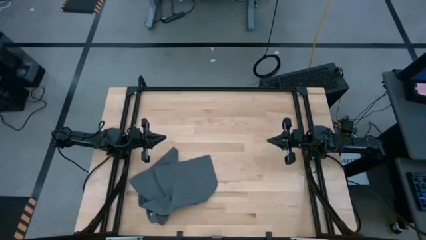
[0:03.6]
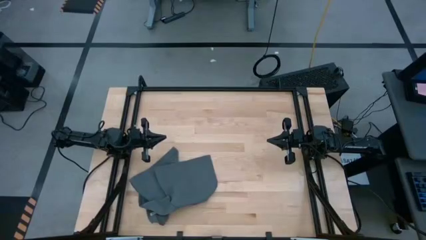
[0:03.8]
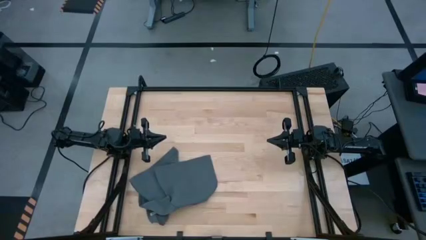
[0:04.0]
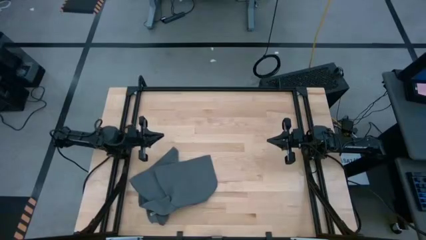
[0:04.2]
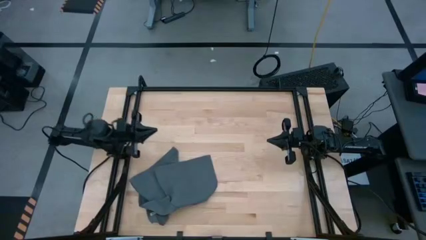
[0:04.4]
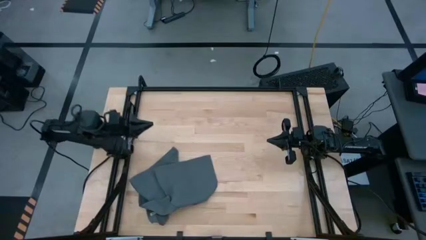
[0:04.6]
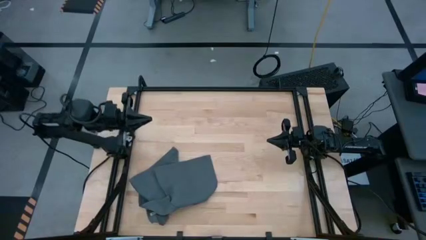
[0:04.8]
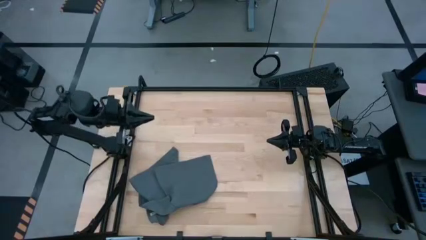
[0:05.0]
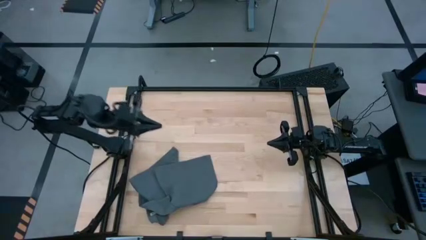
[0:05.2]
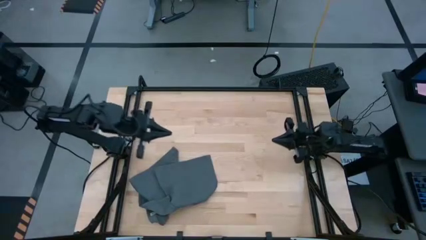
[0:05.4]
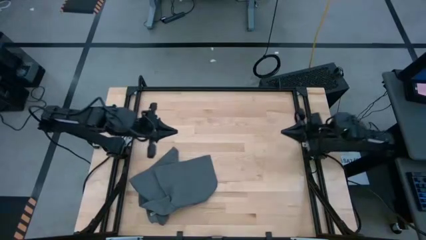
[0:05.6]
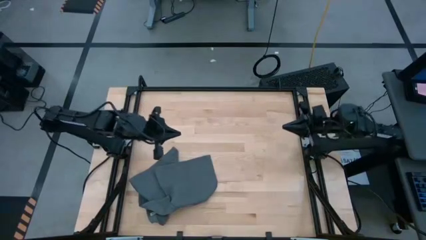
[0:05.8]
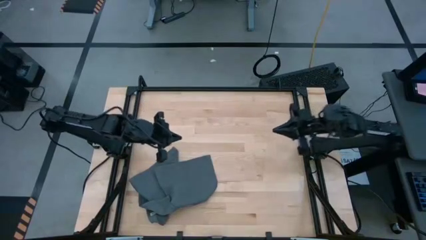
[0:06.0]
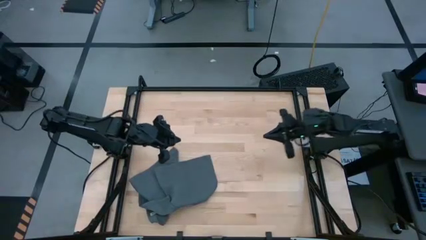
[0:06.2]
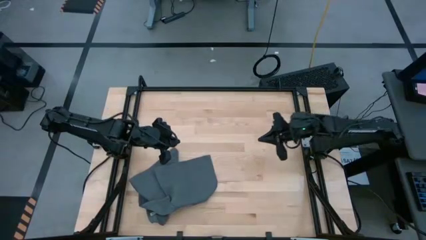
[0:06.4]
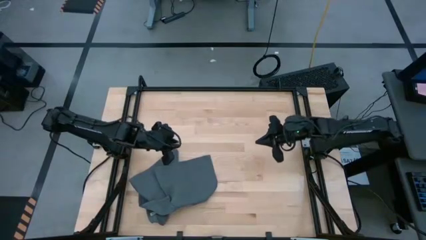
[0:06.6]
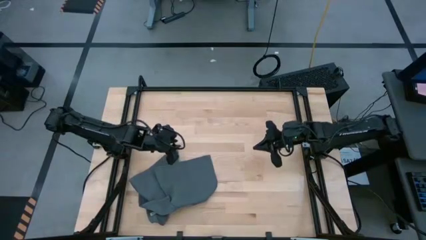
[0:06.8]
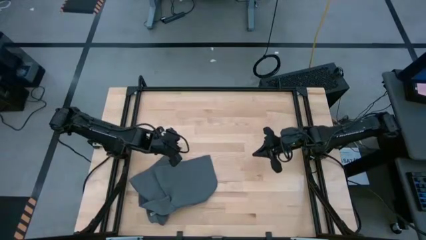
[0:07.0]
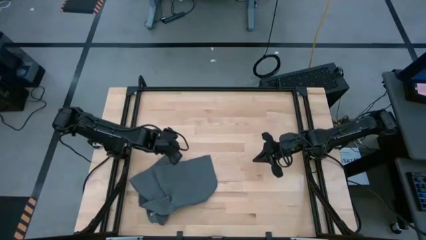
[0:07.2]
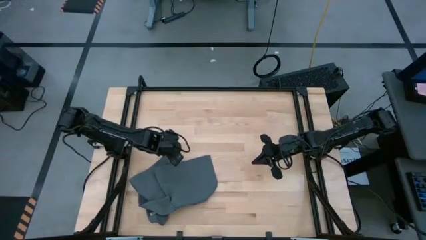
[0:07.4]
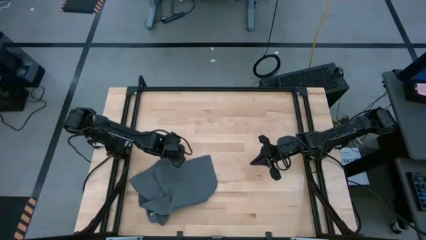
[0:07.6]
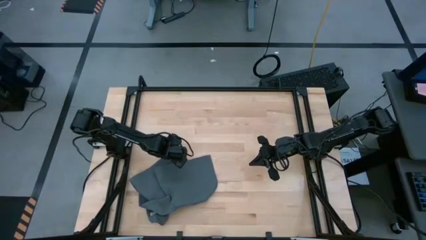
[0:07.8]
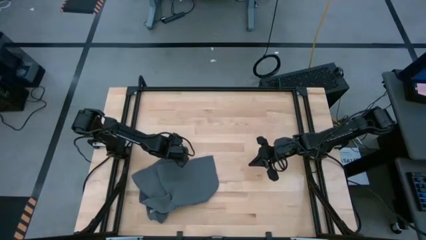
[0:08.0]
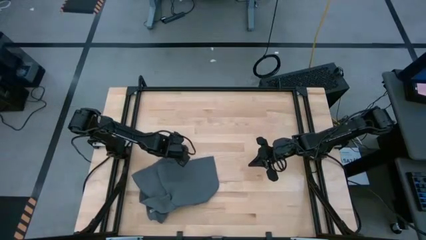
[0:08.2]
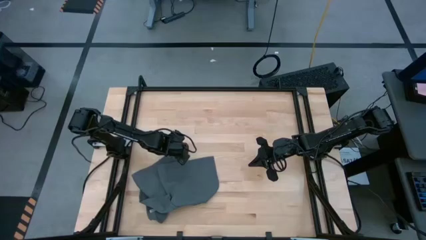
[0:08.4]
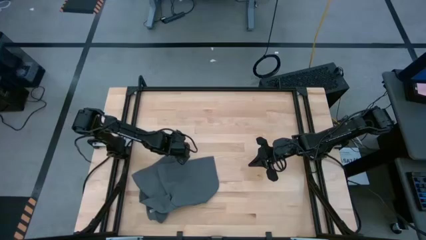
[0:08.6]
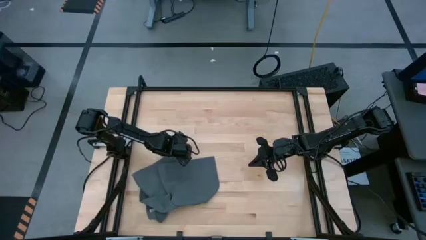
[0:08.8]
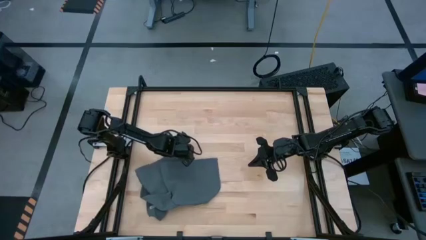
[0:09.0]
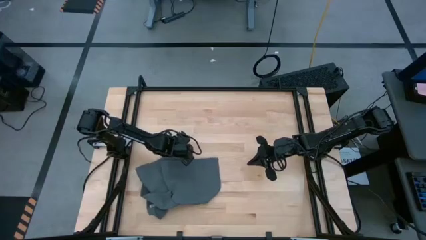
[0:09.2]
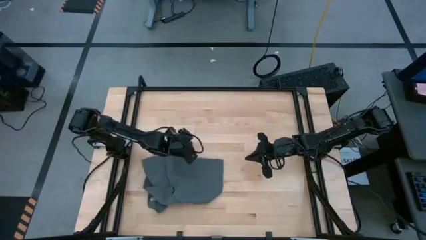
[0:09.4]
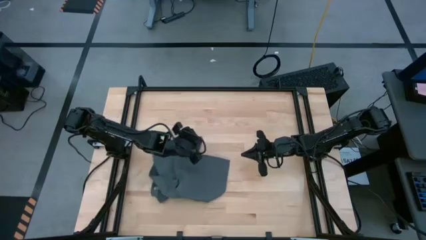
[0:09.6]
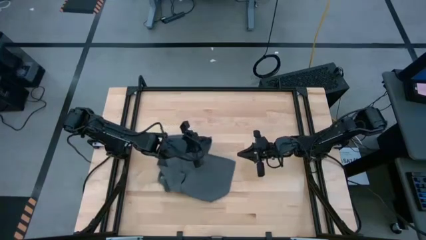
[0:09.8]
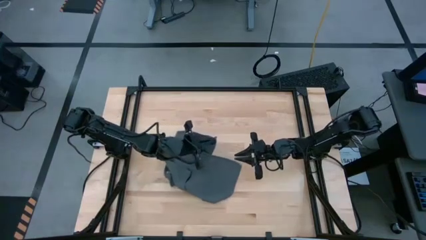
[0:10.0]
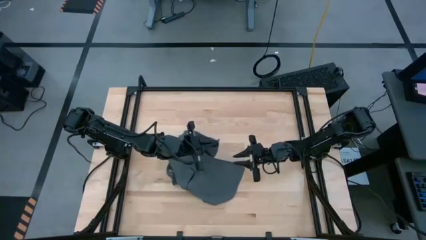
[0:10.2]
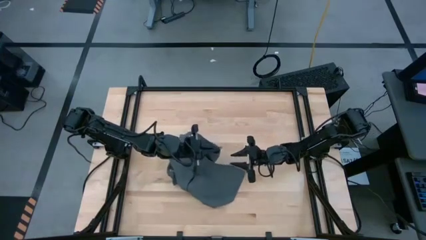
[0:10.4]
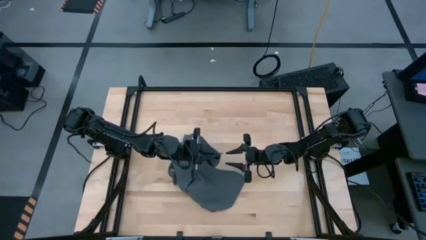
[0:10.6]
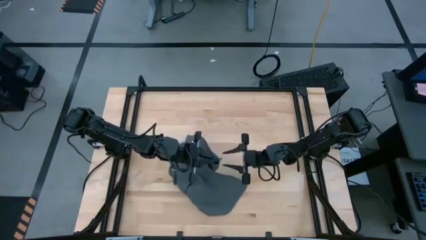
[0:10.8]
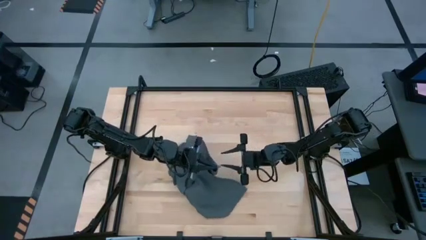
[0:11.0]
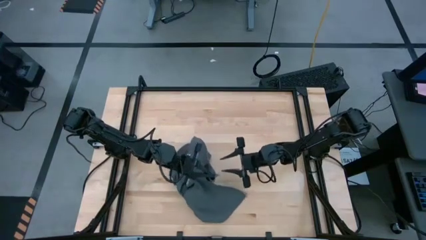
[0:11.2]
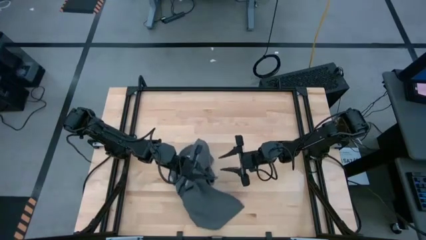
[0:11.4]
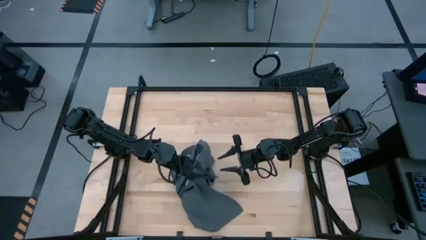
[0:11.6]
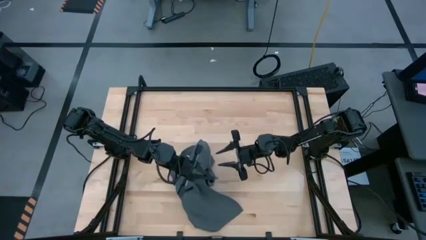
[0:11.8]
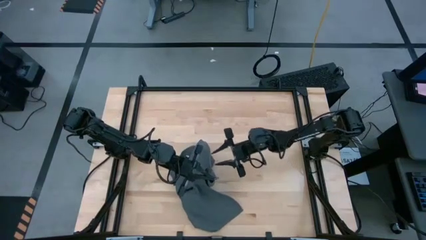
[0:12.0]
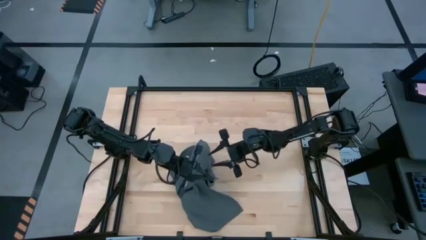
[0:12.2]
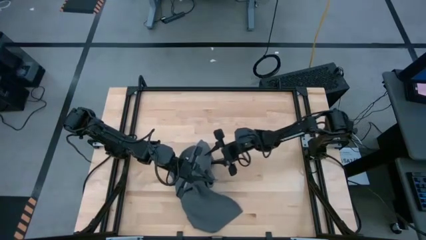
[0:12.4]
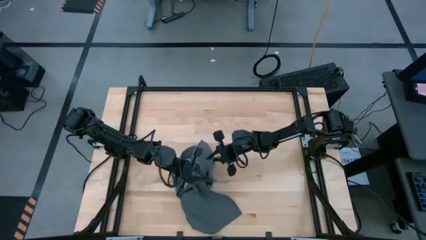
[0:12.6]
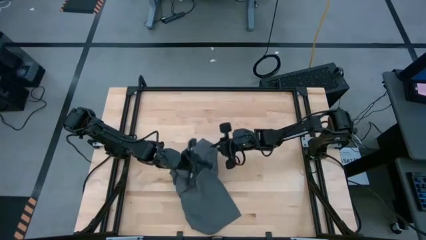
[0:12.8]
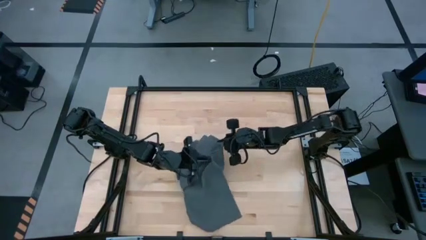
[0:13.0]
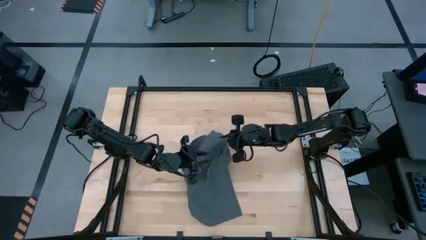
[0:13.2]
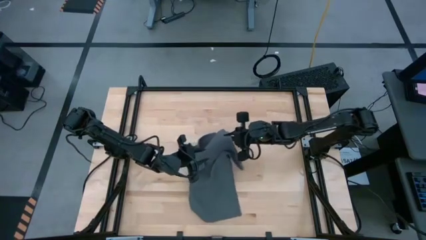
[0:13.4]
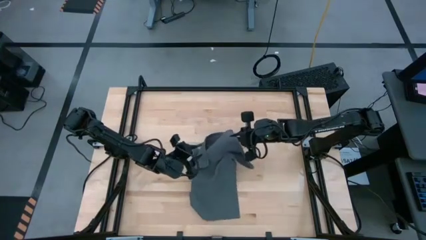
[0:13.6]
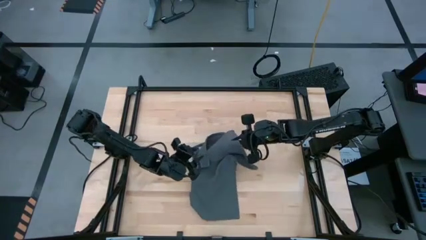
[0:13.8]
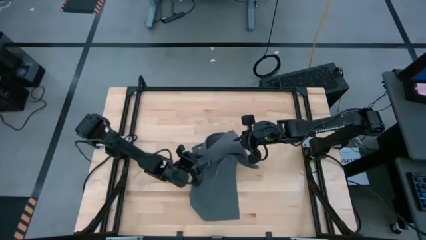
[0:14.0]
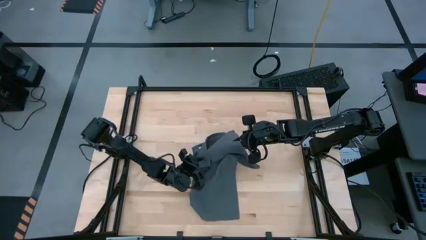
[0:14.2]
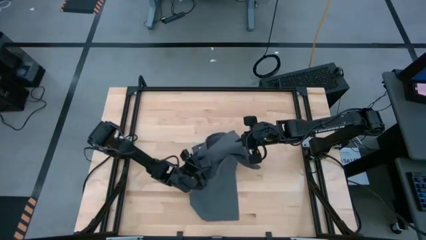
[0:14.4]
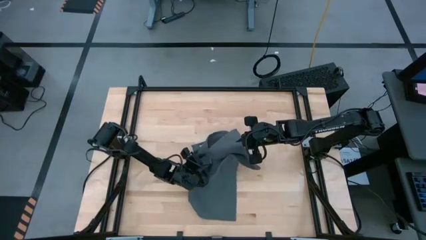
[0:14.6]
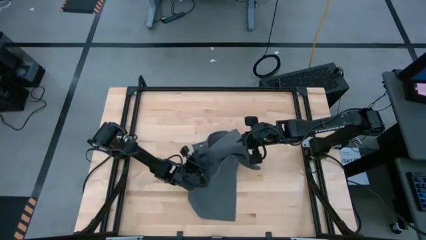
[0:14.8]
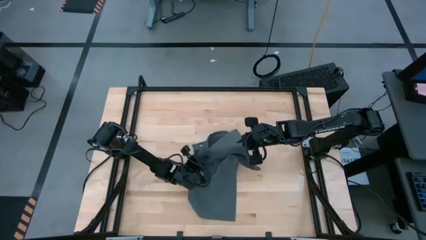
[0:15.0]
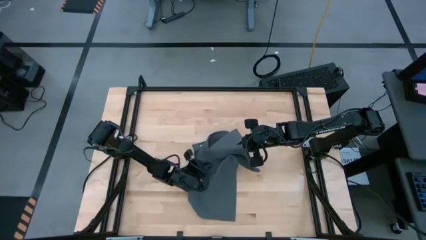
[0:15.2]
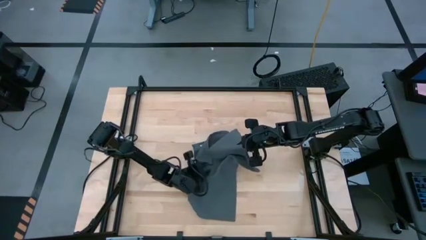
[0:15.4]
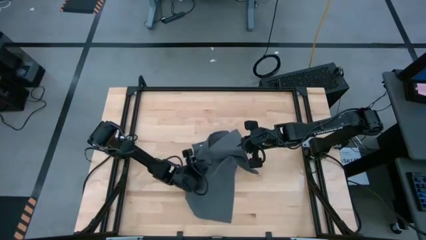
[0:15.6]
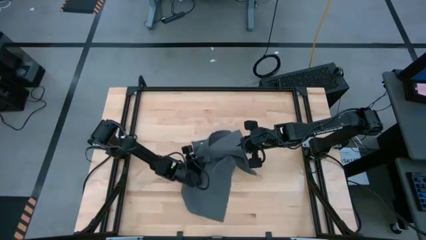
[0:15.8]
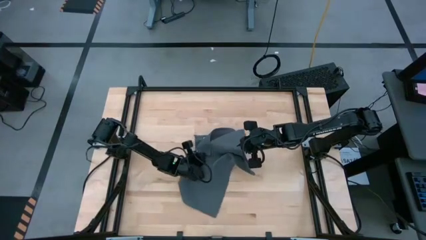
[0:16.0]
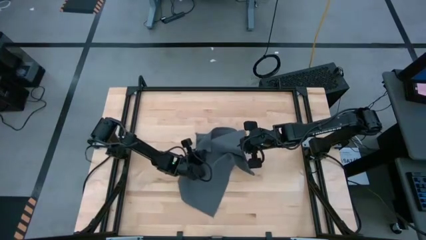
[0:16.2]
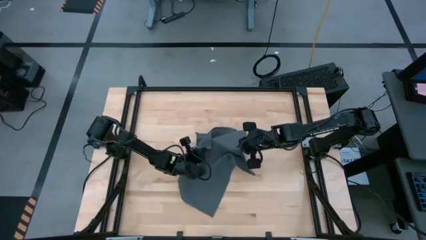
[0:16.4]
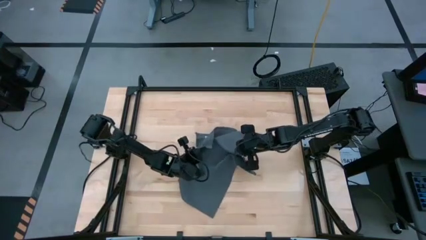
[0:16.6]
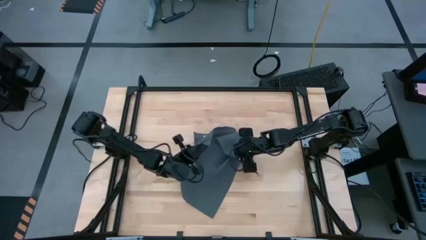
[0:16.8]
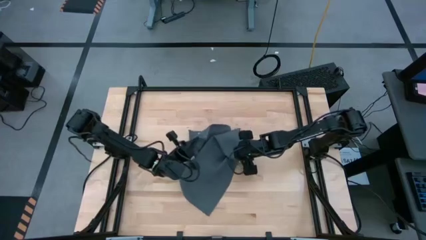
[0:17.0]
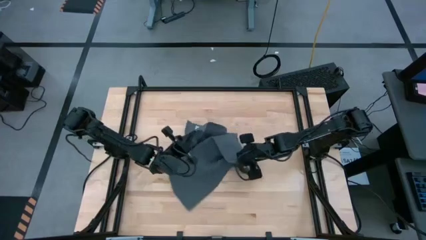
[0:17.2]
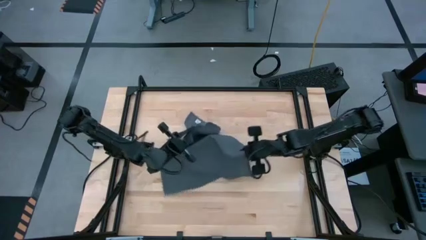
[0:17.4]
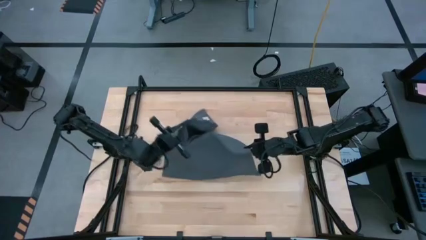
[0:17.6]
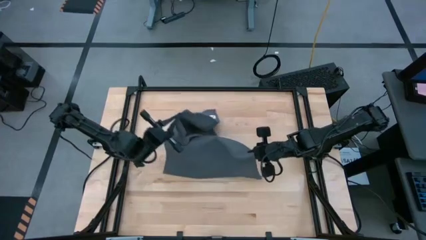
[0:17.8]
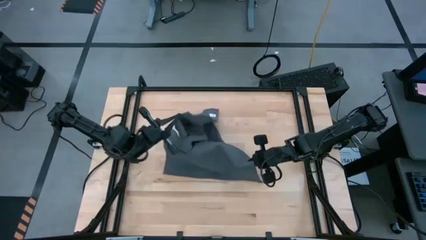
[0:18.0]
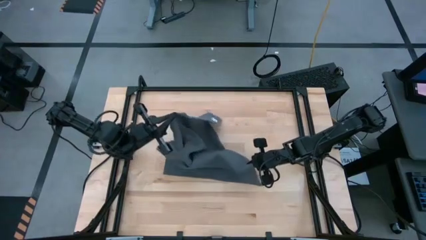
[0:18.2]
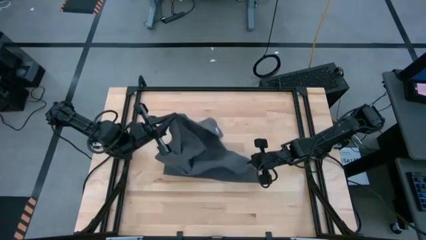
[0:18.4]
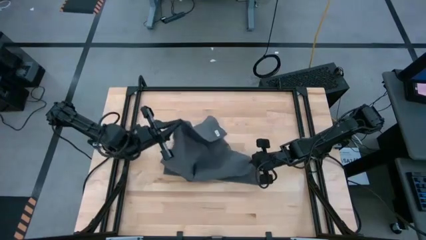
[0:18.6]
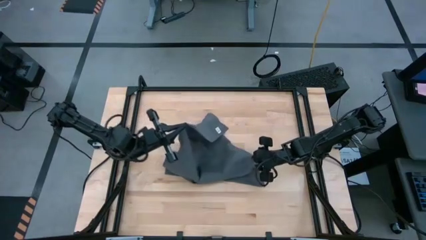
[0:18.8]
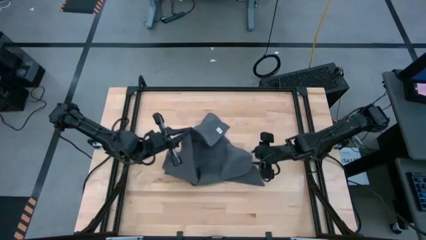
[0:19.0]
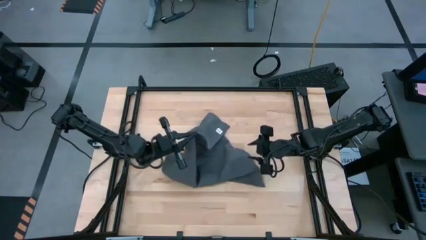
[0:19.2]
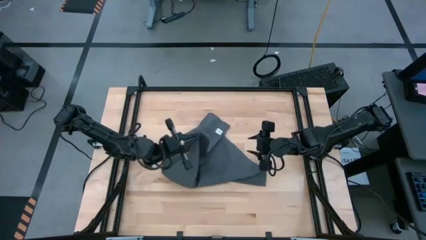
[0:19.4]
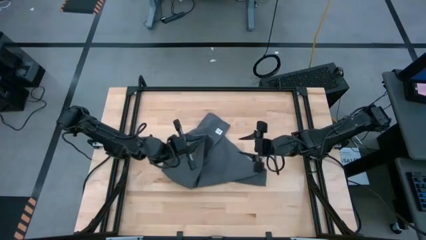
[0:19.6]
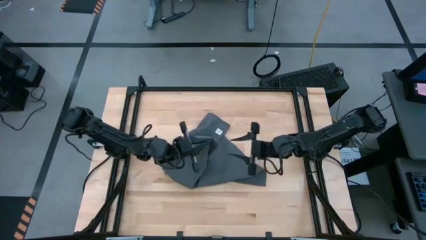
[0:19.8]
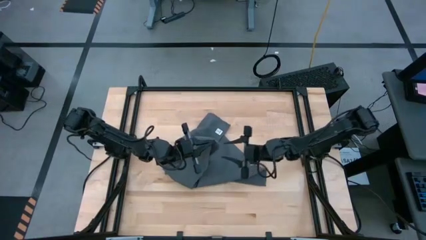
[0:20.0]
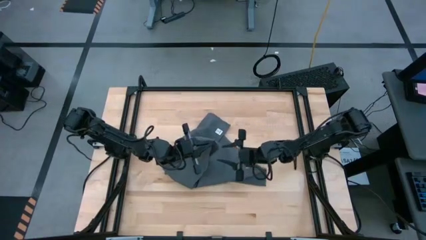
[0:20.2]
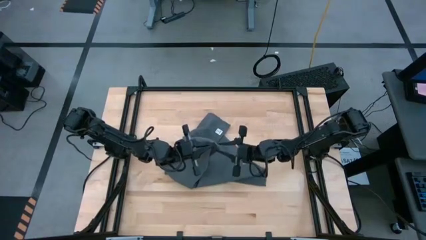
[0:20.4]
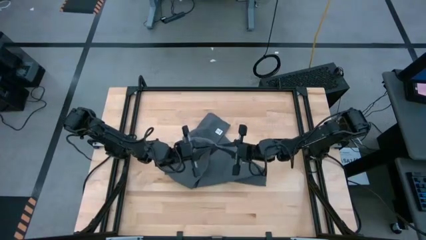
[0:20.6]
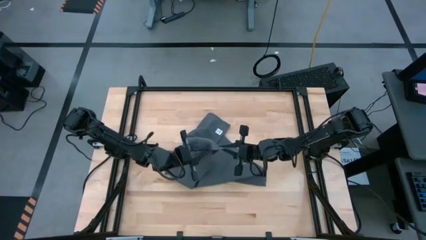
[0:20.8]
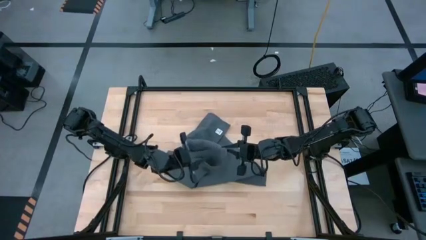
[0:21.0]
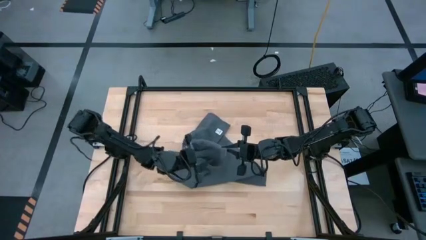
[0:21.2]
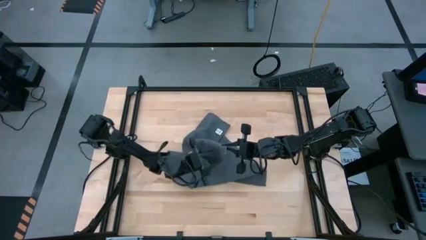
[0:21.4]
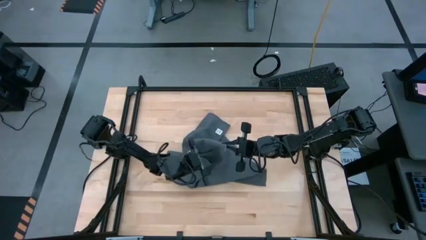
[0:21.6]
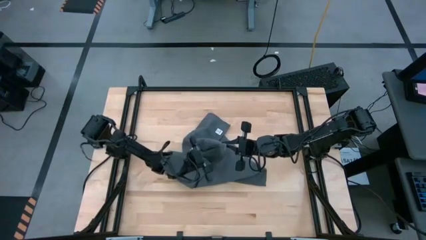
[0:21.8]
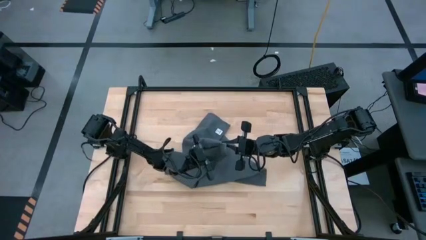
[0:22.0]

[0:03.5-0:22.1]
Task: Roll towel into tight, uniform cylinder
Roll the towel
